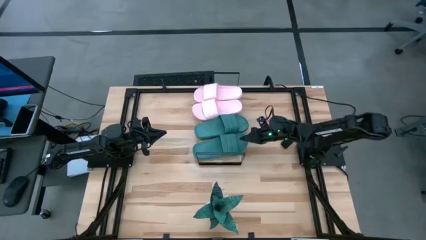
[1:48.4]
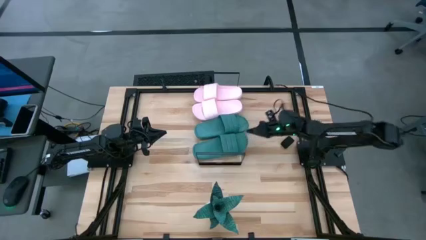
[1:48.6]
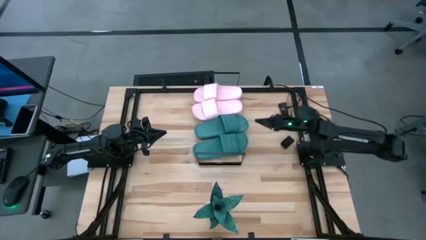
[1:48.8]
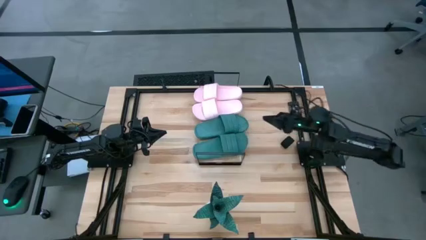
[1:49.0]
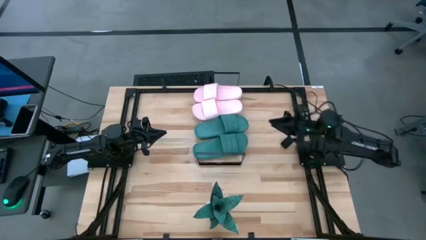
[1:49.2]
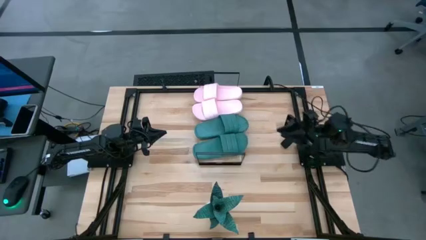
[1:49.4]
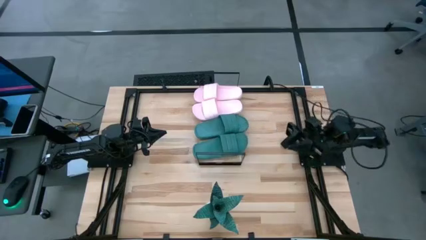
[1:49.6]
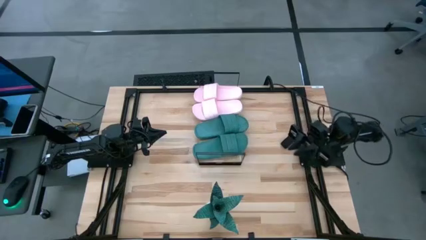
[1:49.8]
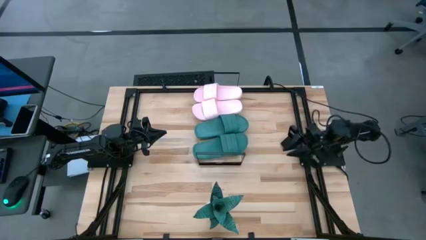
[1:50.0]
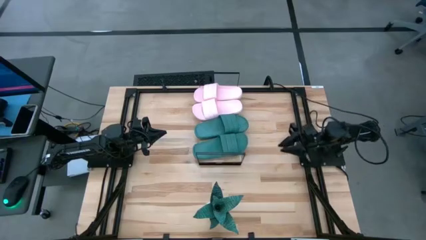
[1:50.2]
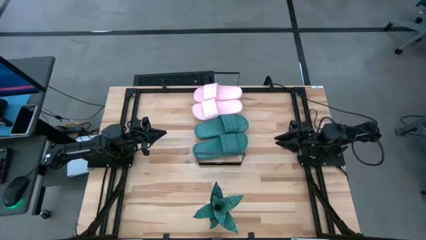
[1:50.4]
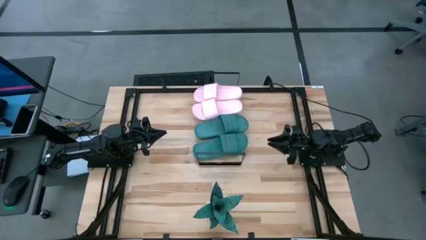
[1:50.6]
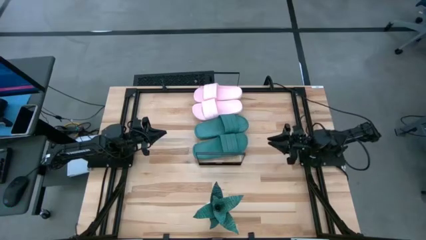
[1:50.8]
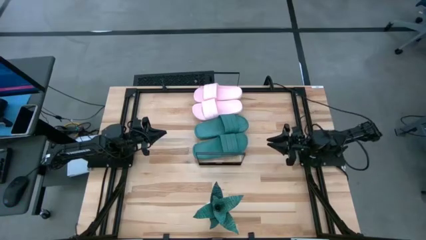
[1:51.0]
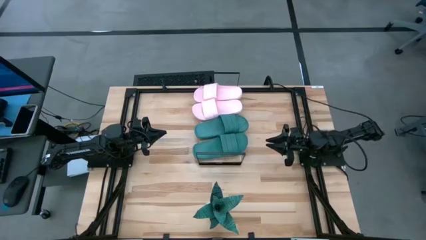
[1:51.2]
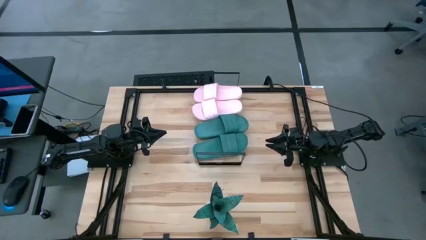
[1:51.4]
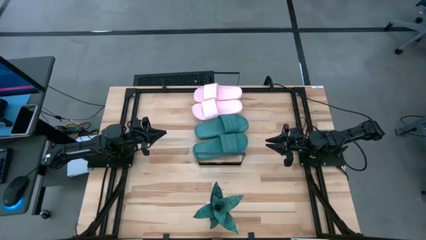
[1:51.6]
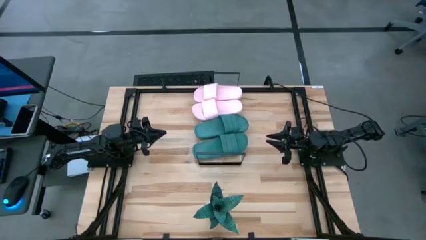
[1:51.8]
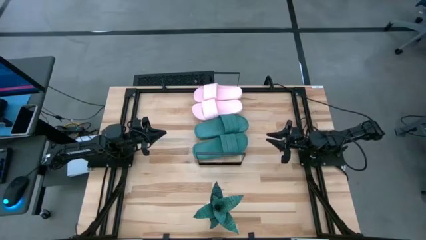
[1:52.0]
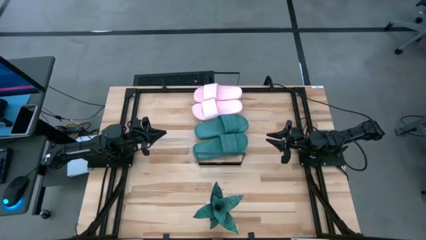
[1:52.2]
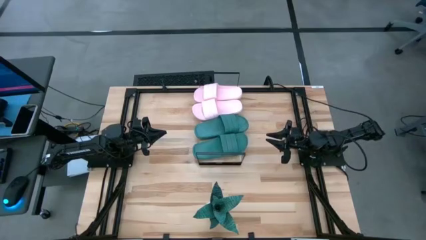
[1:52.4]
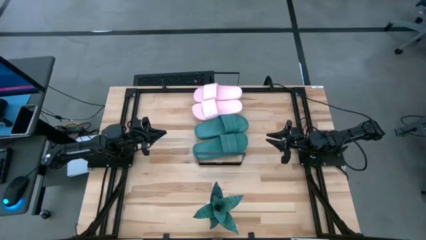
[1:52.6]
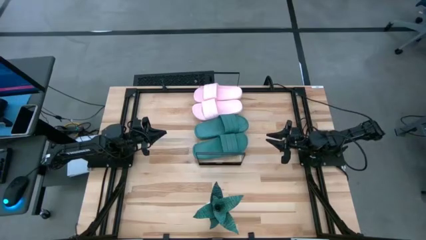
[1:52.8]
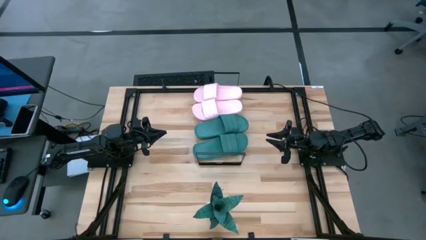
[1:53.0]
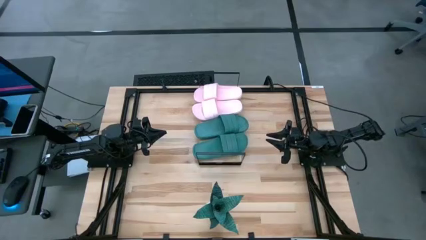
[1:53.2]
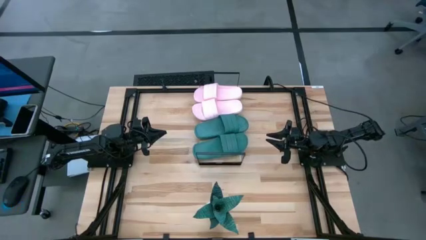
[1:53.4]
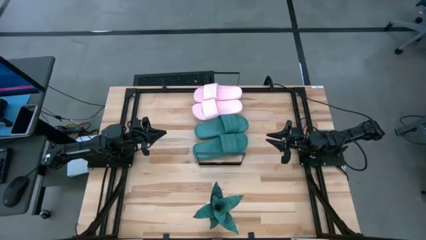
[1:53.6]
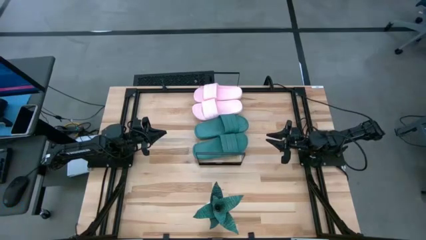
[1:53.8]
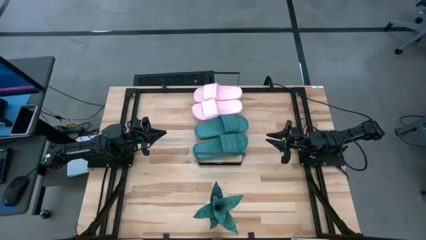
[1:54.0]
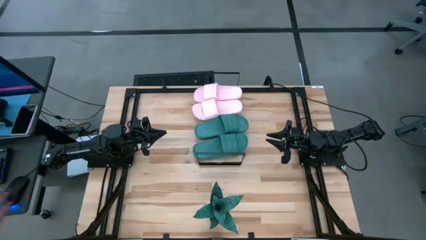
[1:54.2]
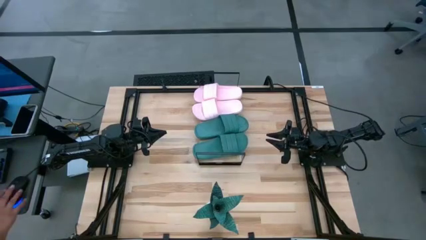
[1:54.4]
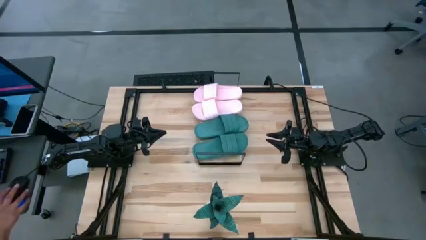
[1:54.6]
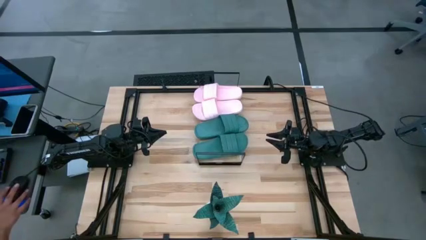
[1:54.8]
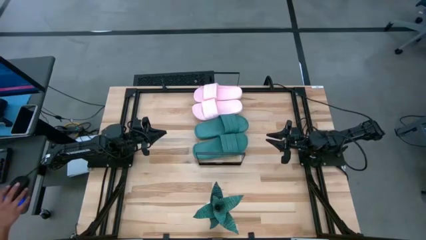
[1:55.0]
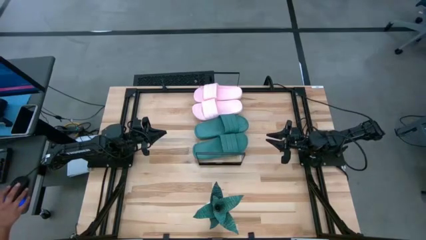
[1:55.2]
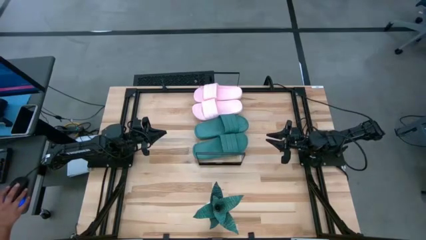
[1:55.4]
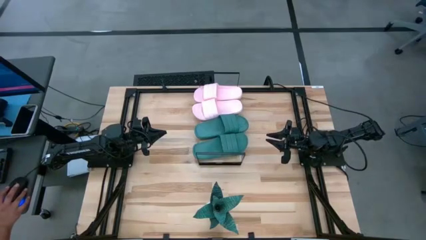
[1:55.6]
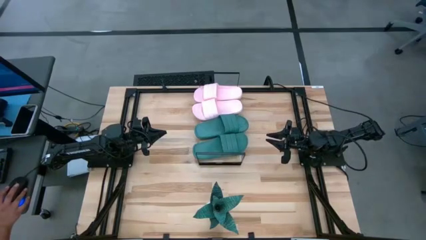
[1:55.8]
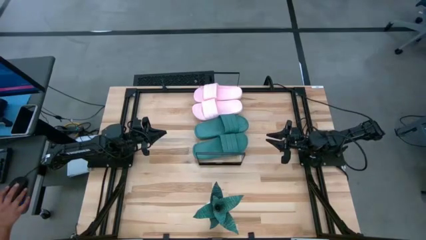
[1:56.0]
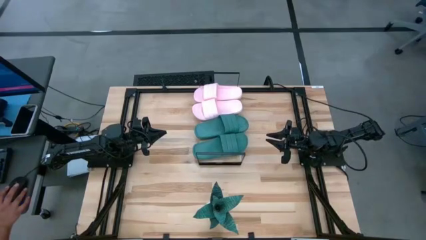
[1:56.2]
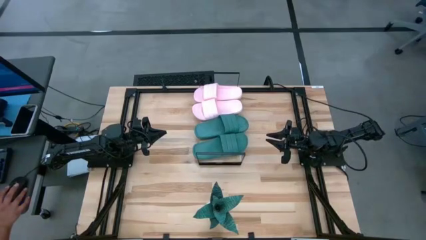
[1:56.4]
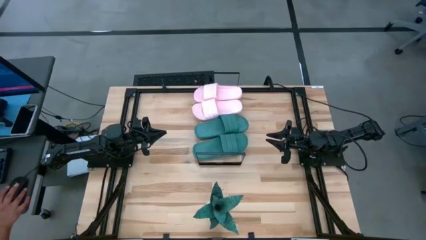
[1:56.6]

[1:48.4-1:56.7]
Task: Pick and place slides into the shelf
Return to home position

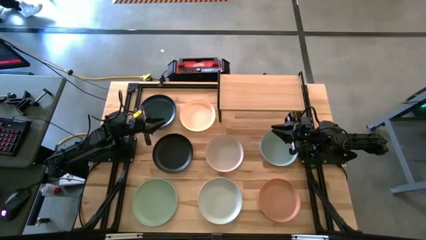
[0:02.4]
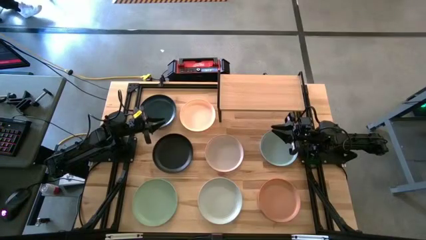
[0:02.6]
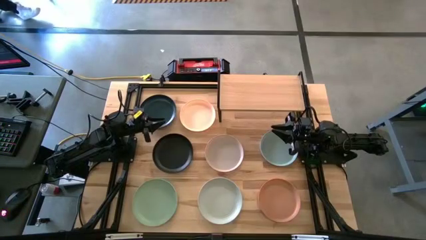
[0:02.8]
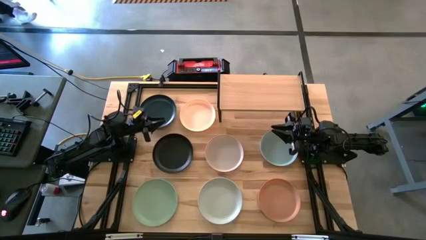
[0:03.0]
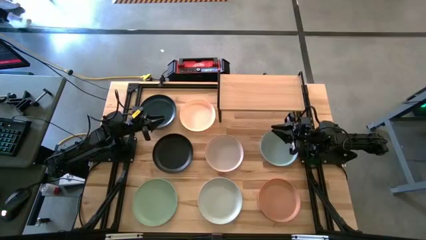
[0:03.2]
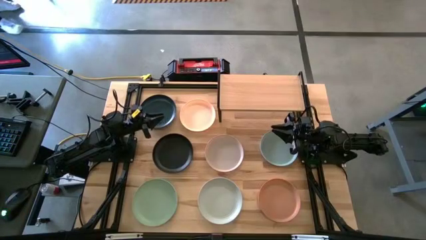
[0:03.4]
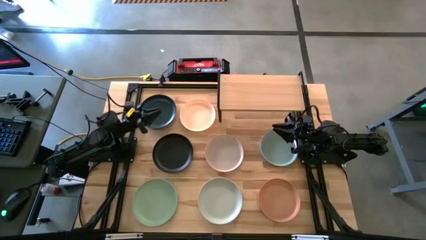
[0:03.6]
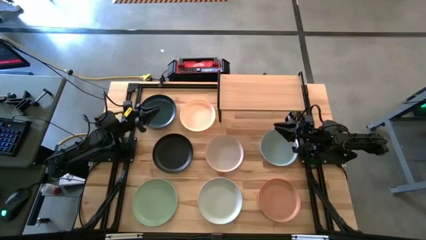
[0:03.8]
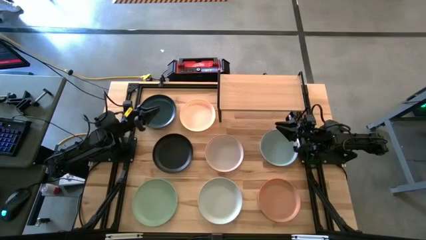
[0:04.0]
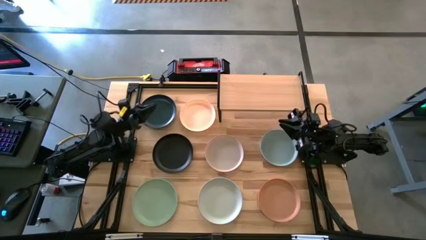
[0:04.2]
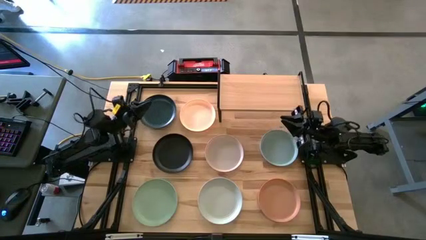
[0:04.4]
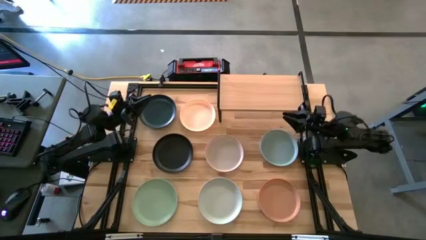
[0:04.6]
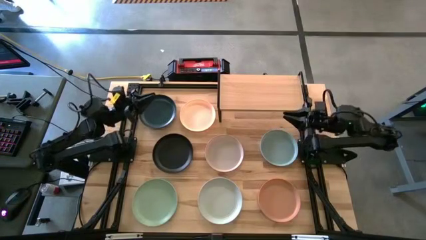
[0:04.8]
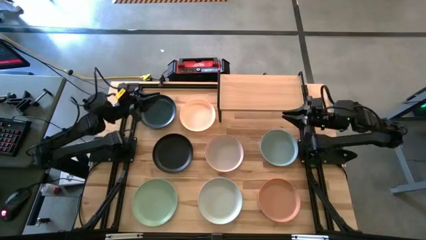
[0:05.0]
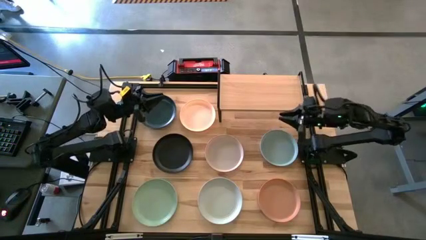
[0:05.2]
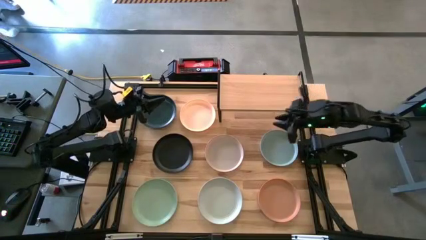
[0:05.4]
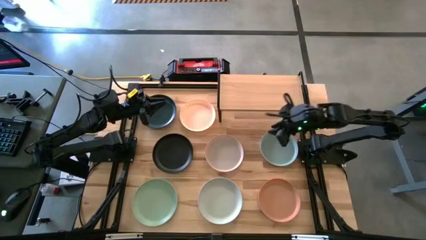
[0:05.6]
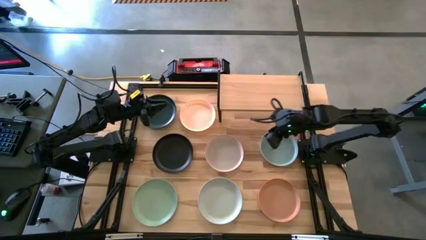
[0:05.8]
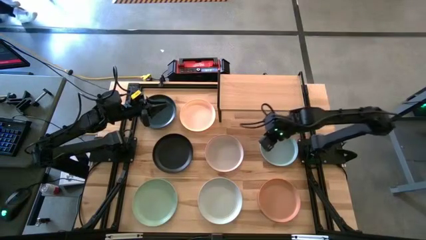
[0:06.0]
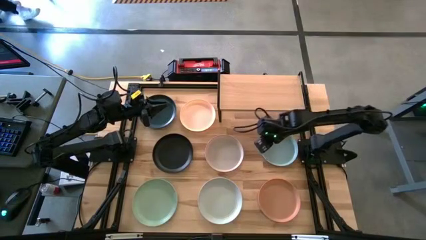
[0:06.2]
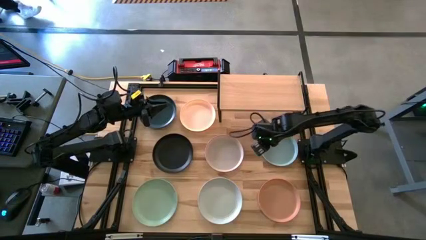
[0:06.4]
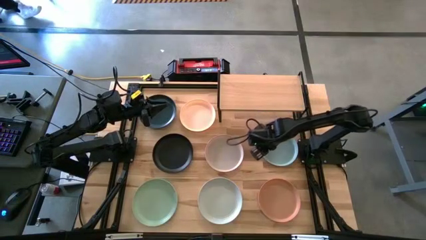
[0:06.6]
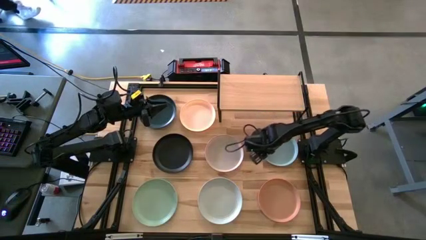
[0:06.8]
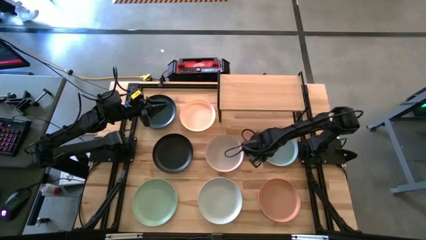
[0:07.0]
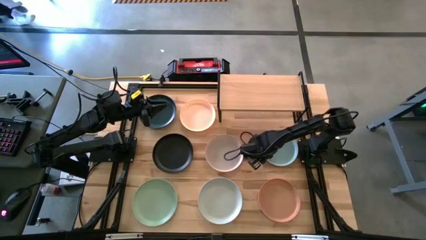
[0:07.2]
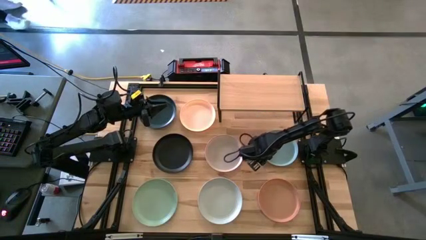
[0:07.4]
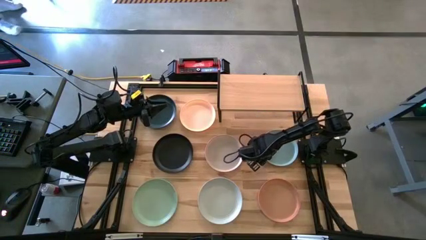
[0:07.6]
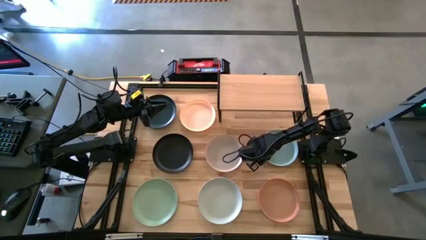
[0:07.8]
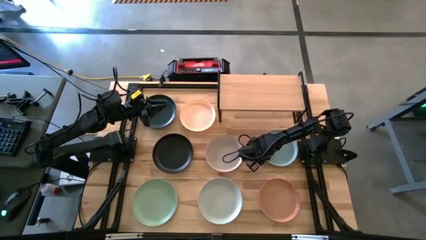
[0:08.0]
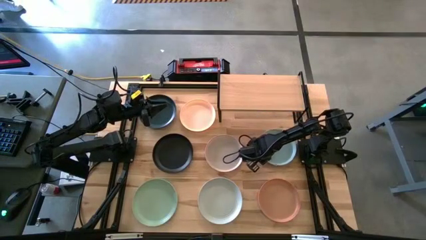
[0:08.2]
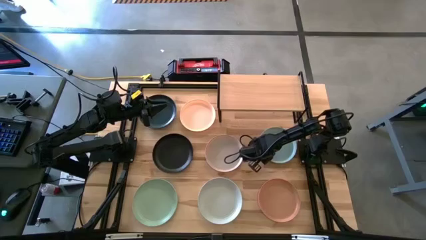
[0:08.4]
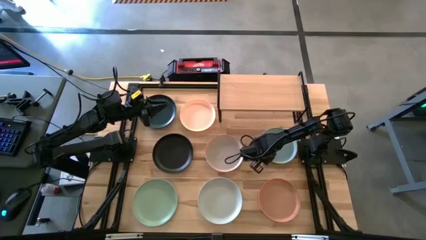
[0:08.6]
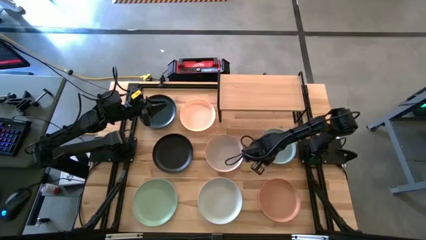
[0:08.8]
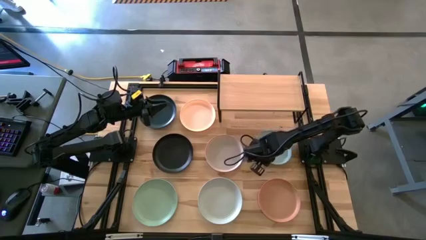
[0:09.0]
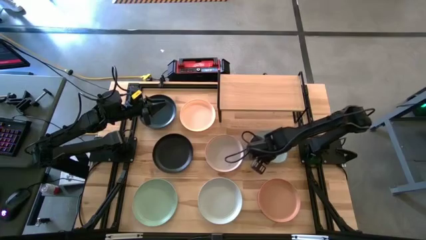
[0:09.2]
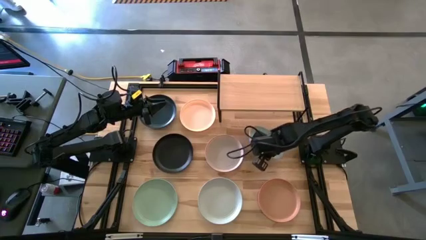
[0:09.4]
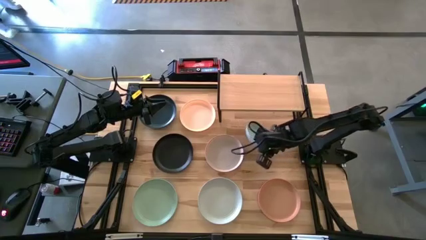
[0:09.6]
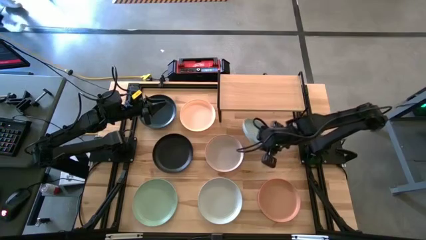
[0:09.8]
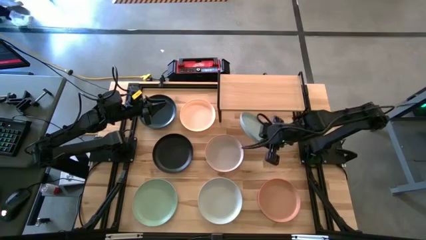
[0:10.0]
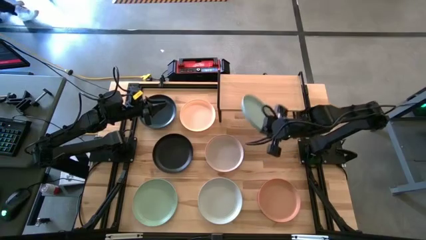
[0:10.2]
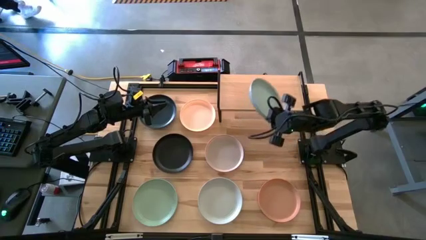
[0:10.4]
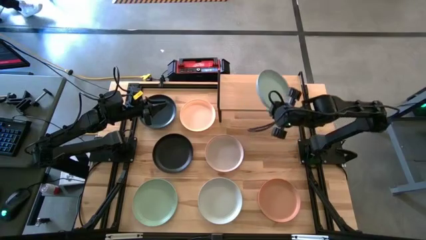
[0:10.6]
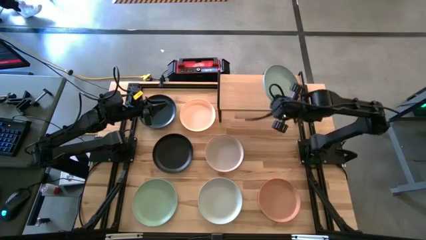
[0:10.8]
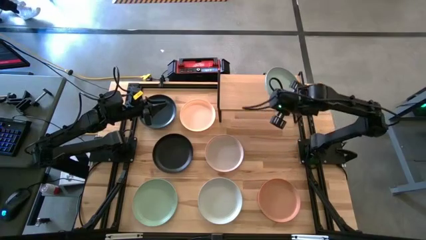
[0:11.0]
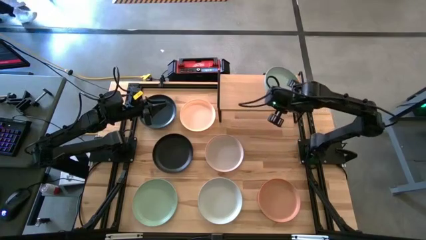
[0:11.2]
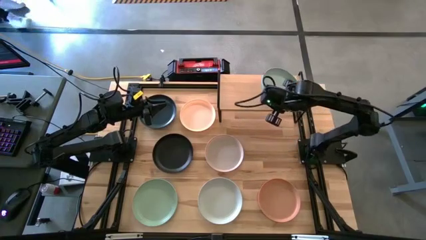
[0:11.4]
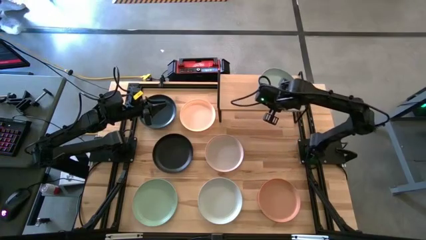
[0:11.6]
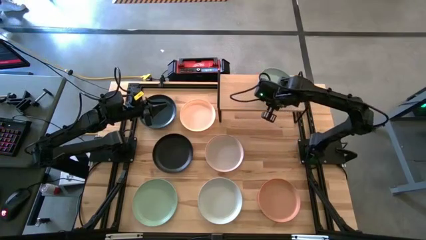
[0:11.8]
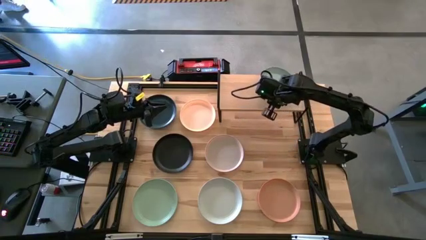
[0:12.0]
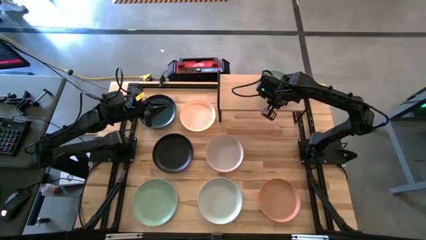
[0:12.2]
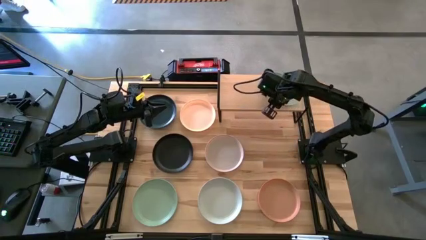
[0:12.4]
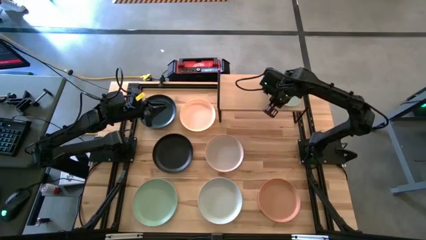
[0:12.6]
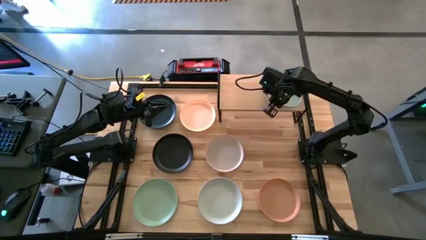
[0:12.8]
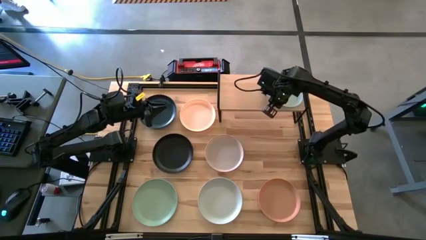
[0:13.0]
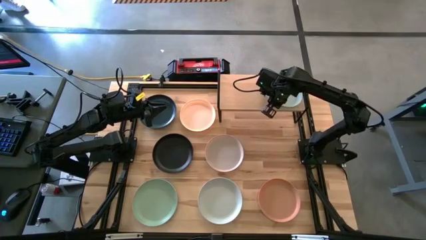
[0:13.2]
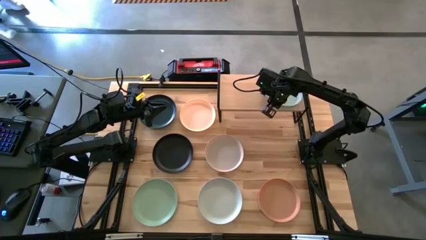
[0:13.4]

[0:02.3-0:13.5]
Task: Place and stack plates onto a shelf
Put the light blue plate on the shelf
